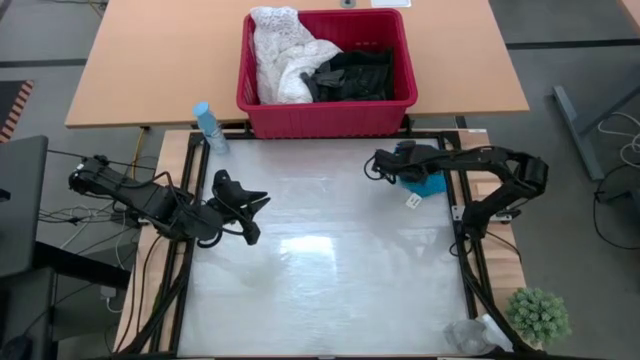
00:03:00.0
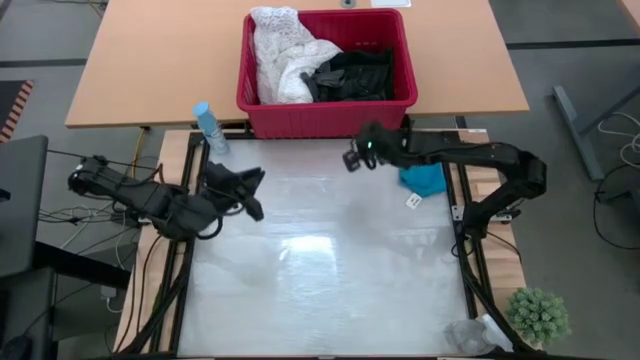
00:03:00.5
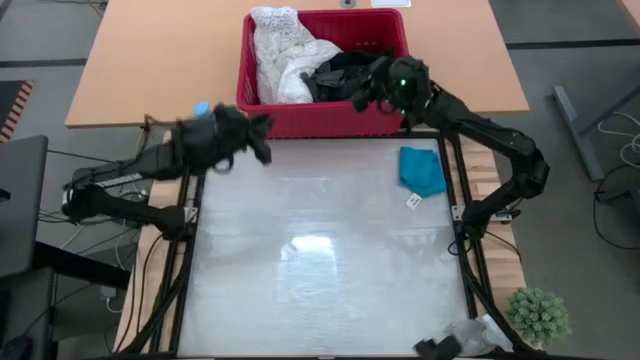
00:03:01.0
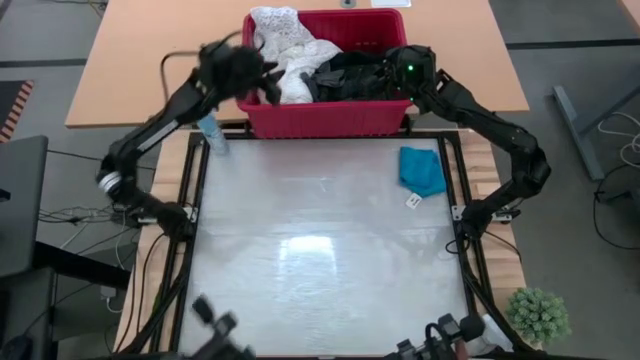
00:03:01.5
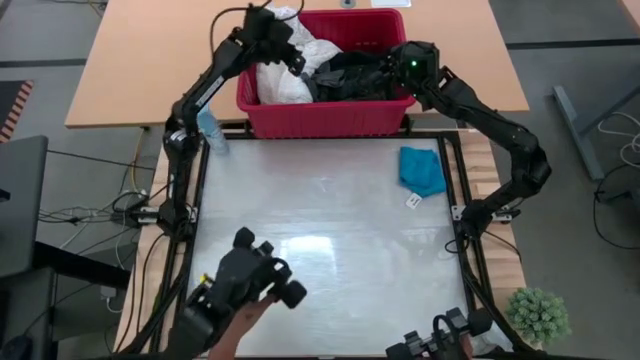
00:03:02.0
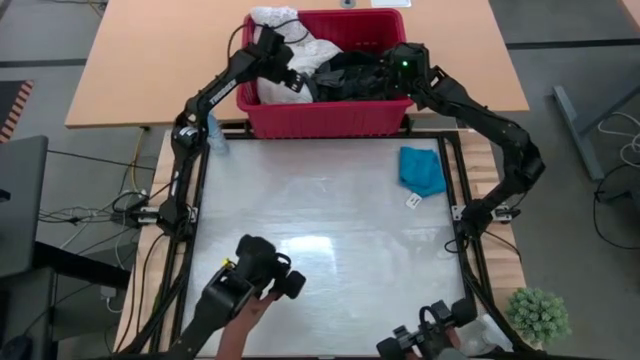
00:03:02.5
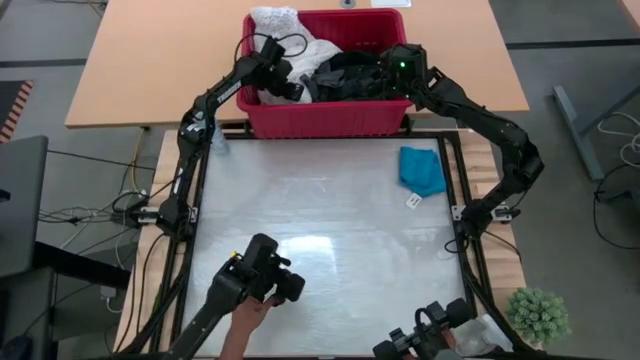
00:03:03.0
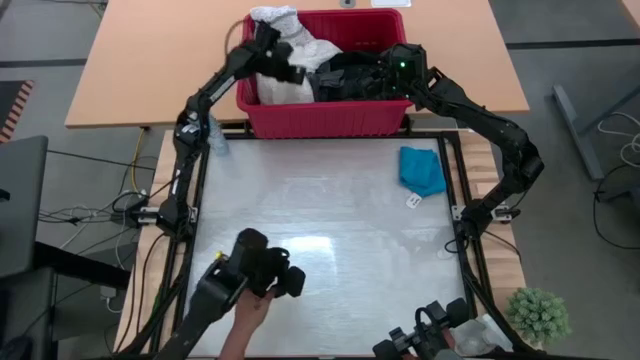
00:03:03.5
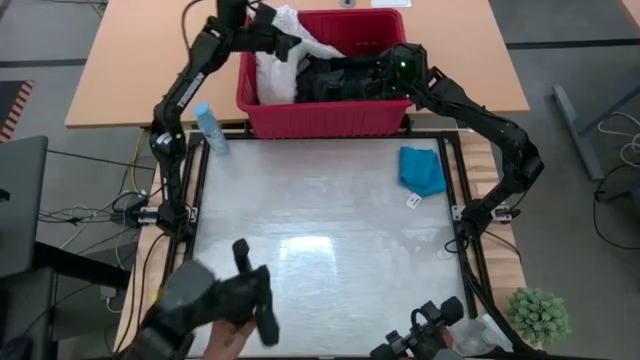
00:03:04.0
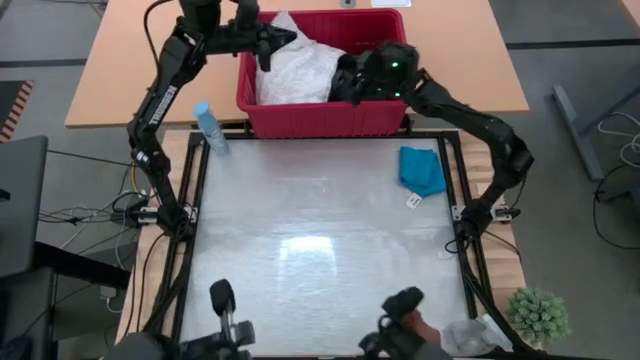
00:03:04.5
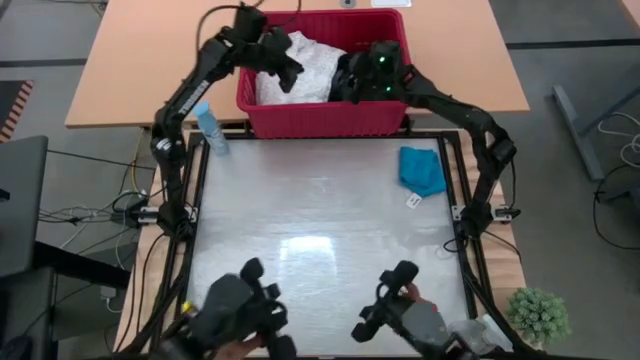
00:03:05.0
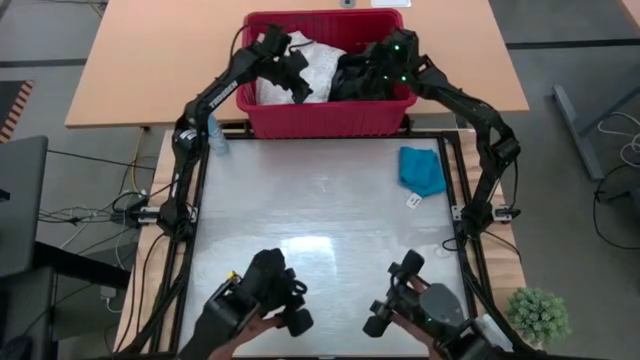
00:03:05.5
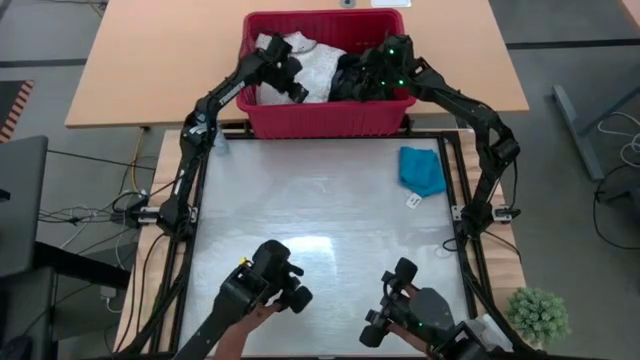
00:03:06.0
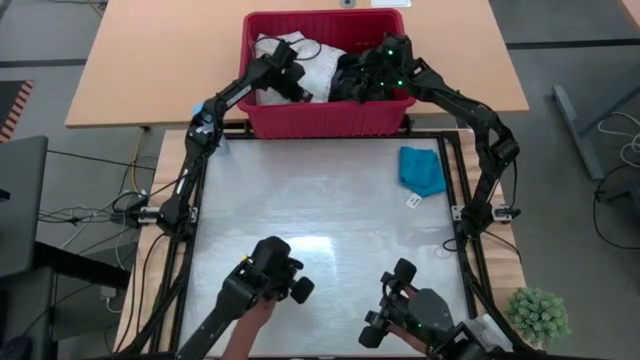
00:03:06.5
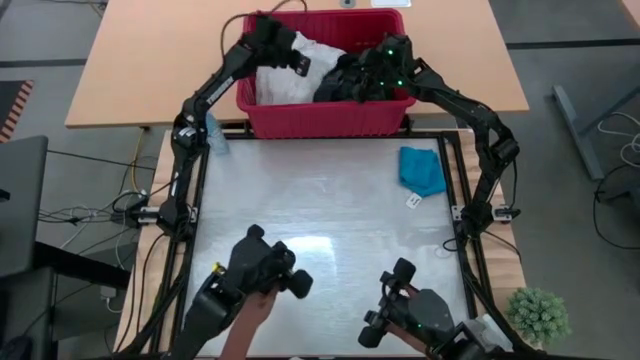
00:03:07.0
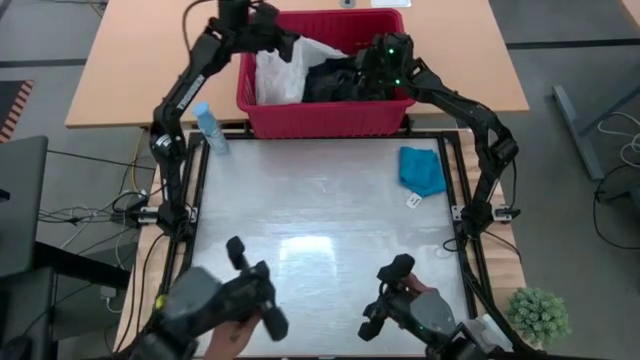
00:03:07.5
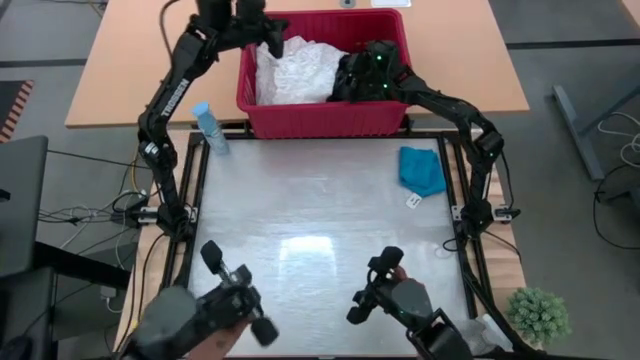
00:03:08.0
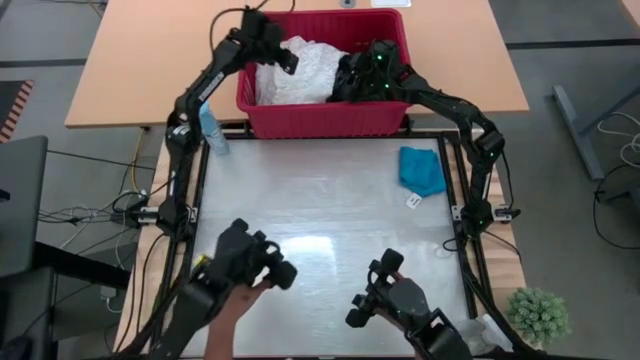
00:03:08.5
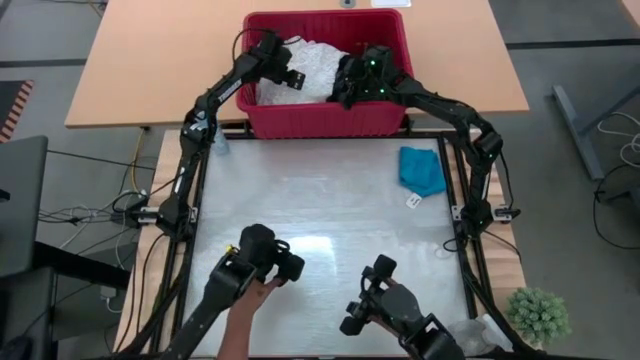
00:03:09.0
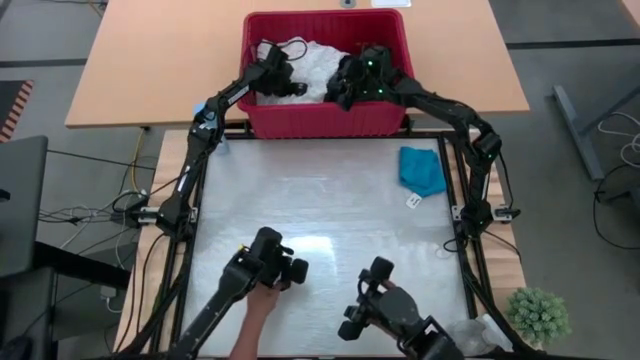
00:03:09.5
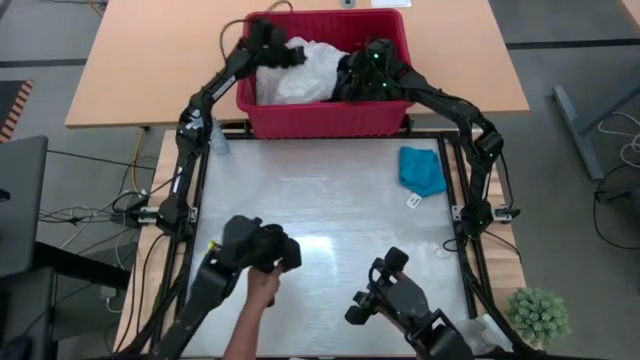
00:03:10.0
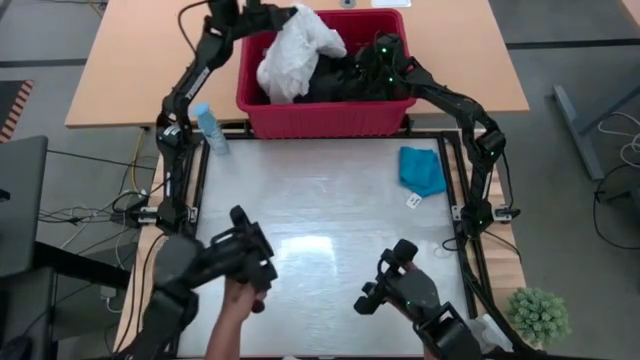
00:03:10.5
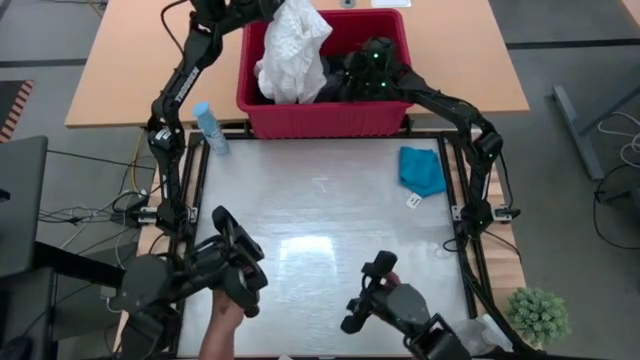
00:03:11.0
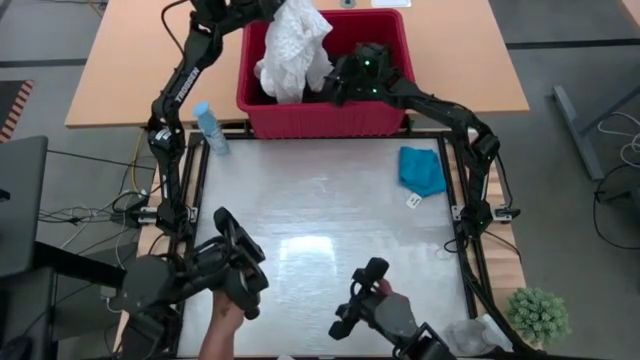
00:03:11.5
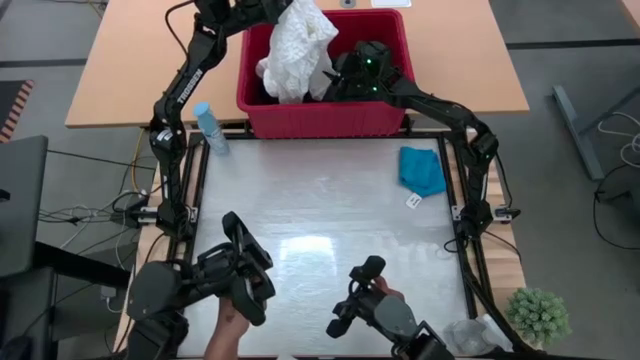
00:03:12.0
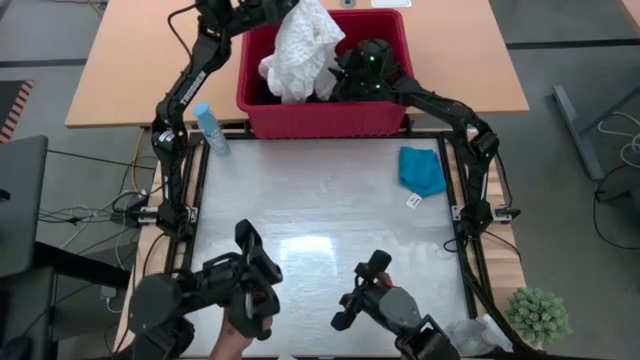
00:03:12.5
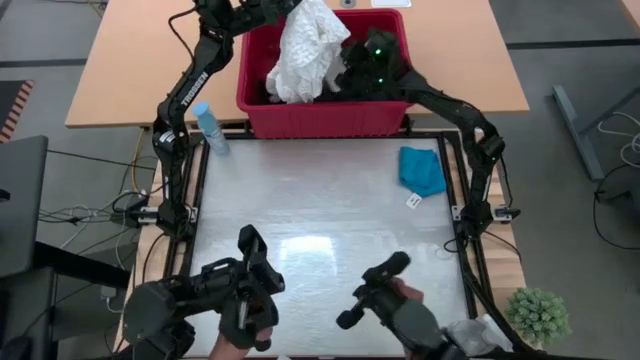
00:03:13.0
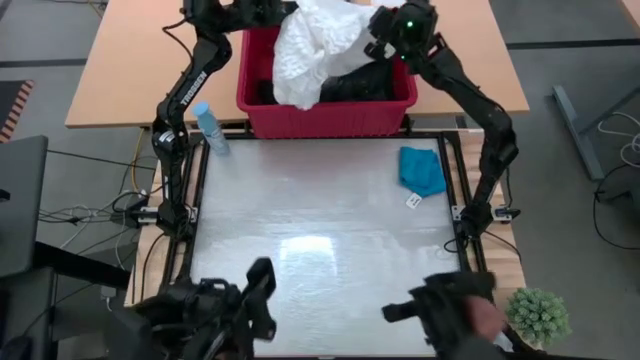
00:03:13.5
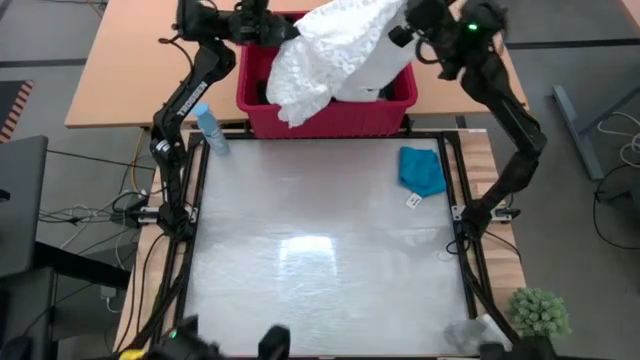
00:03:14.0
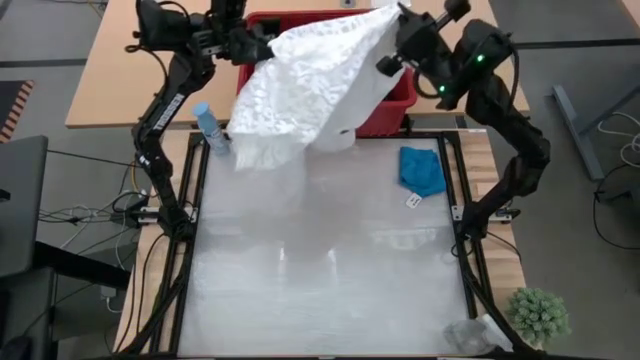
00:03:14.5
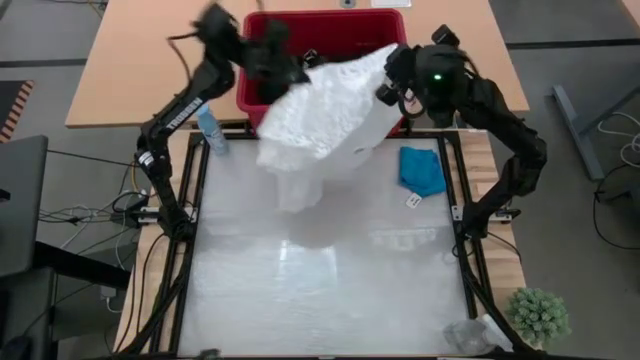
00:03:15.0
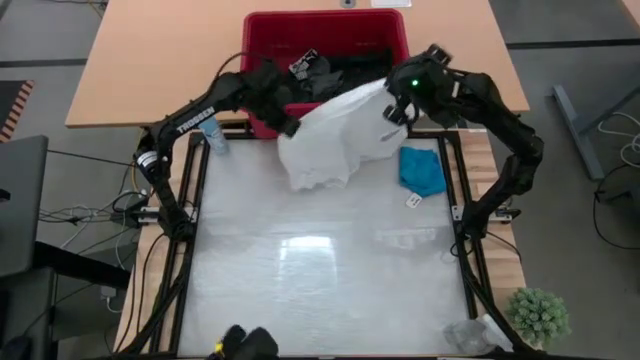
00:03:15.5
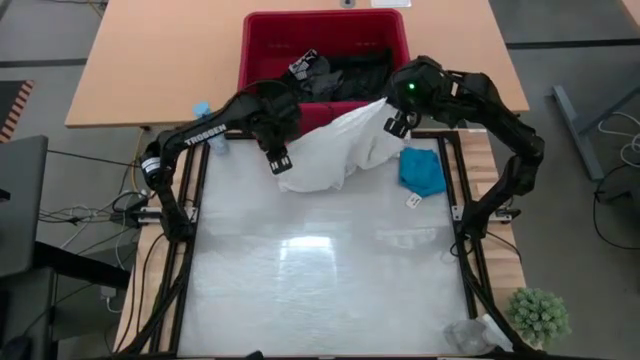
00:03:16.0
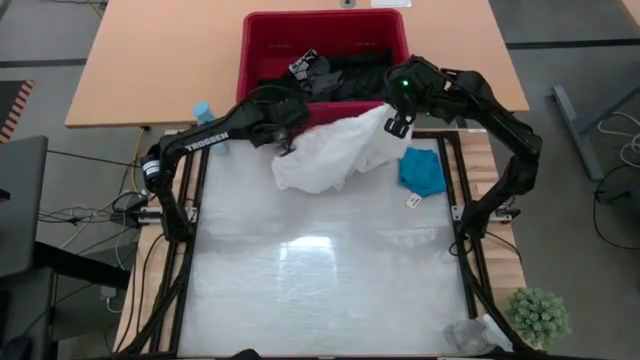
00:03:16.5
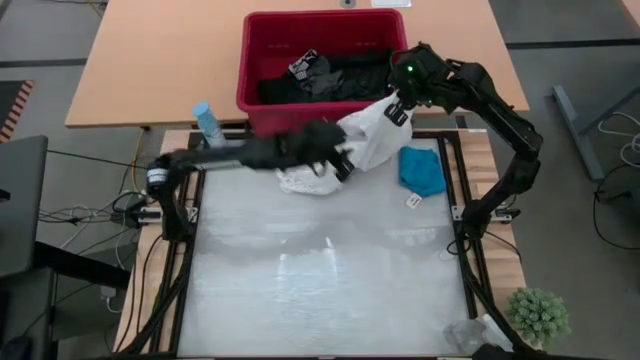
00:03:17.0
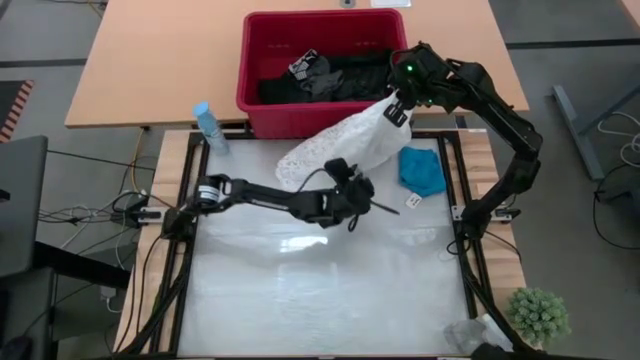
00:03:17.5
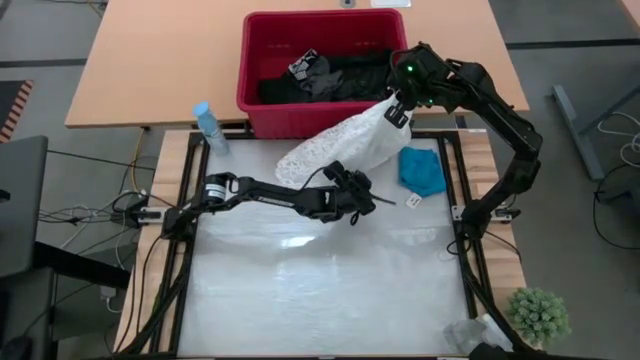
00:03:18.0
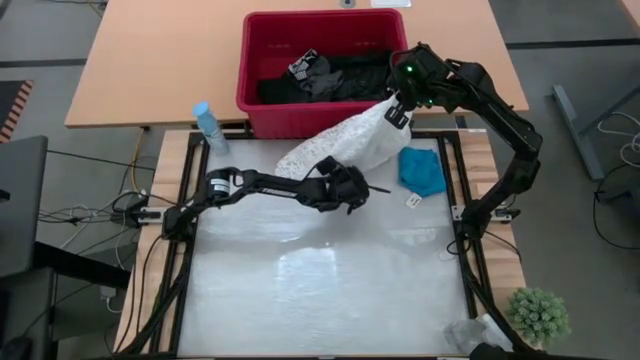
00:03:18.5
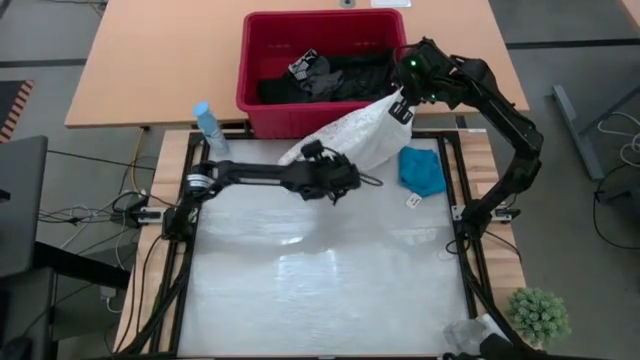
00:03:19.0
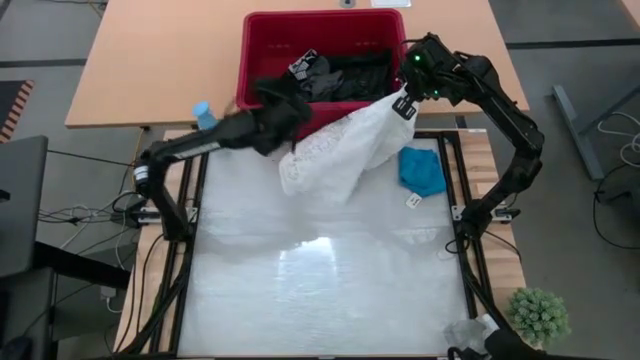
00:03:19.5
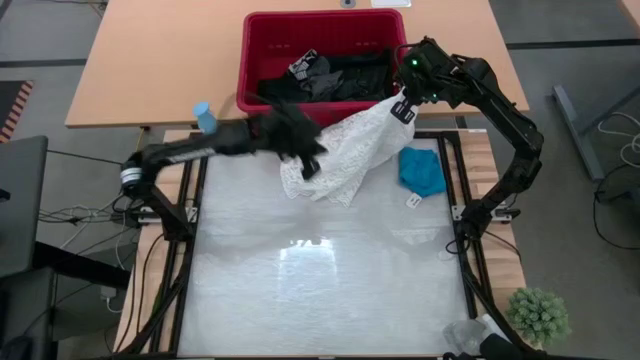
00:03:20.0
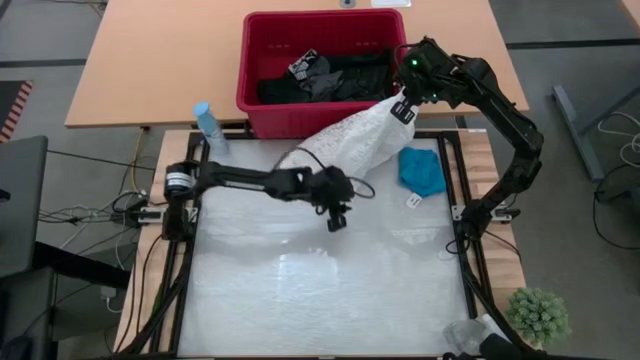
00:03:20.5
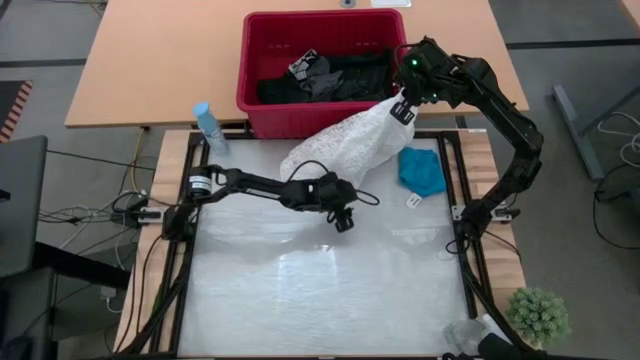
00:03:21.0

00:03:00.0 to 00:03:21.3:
Task: Fold laundry
Fold the white shirt

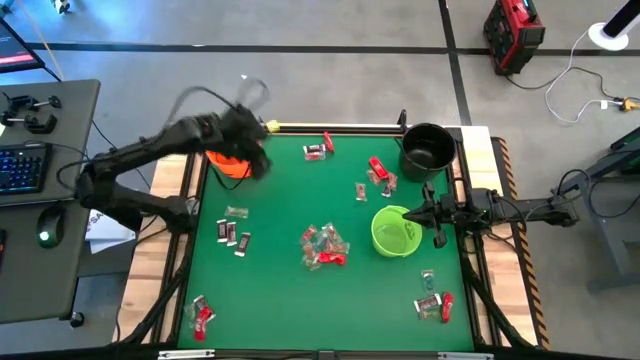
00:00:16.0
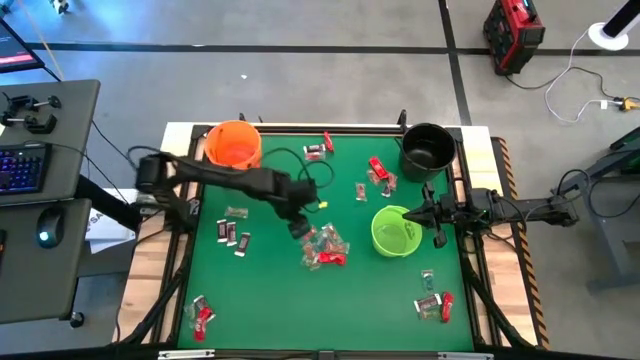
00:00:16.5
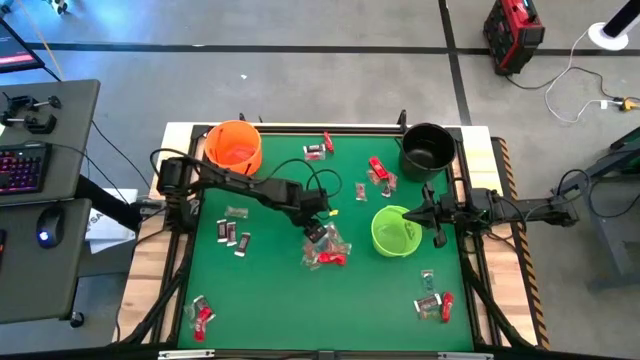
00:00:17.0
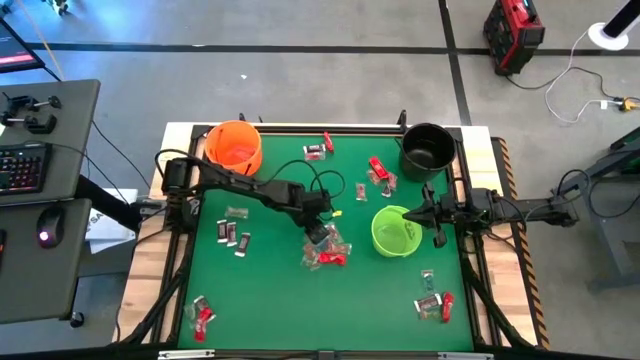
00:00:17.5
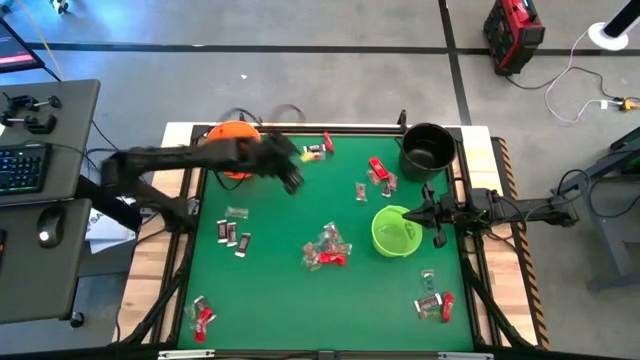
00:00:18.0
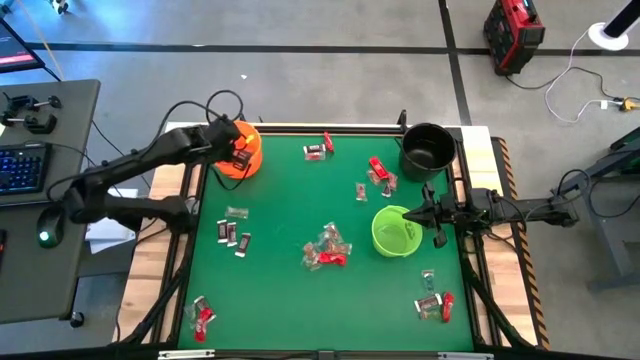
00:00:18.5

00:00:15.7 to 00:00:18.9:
Task: Sort candy by brand, put in halloween buckets
Put the red gummy into the orange bucket
